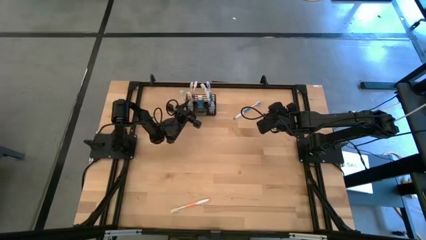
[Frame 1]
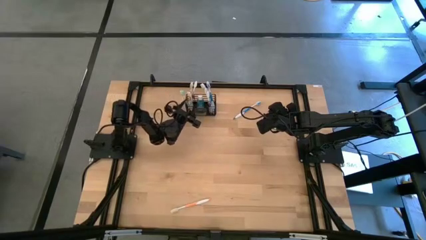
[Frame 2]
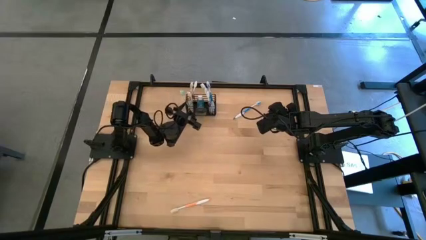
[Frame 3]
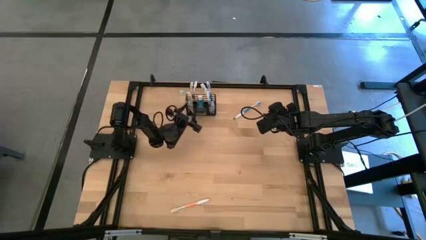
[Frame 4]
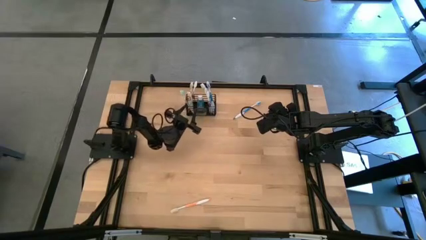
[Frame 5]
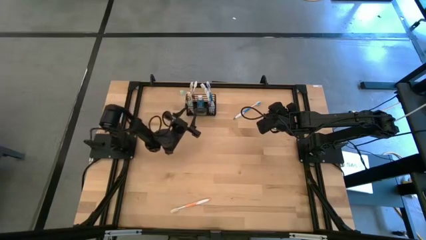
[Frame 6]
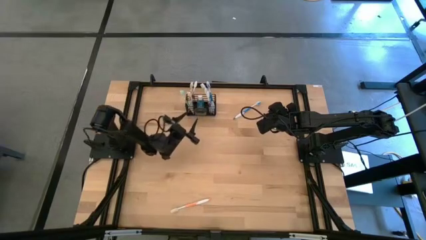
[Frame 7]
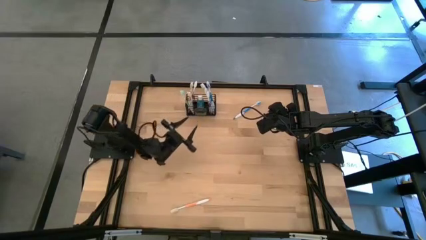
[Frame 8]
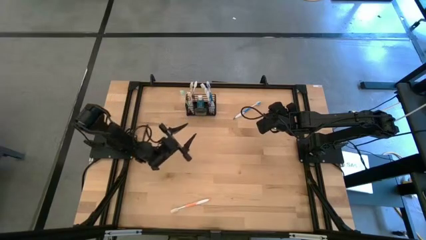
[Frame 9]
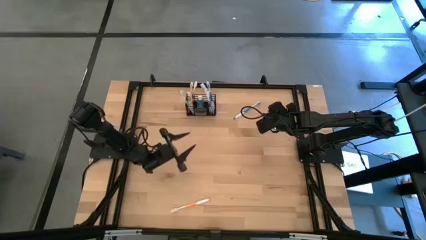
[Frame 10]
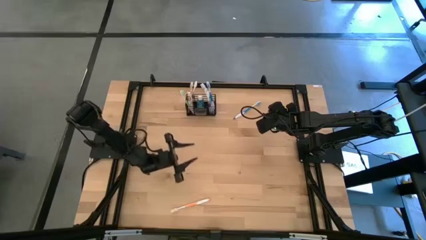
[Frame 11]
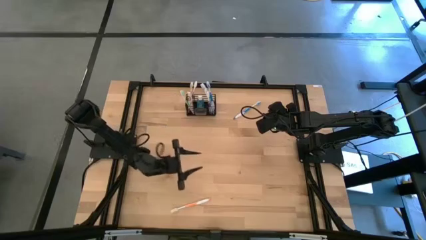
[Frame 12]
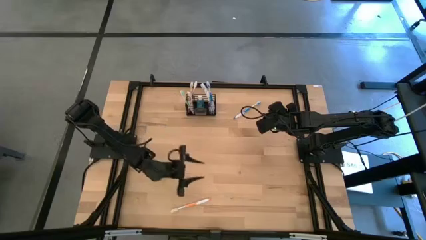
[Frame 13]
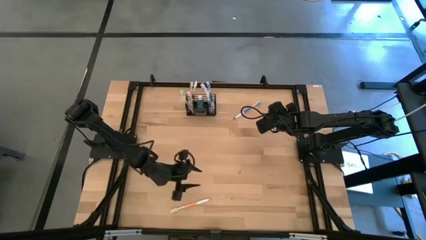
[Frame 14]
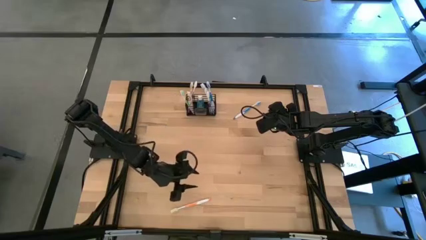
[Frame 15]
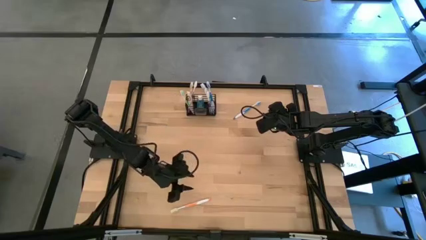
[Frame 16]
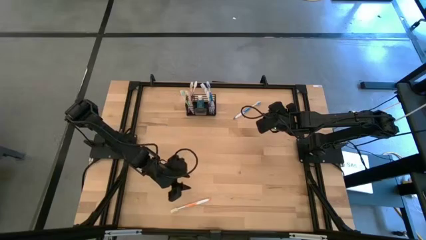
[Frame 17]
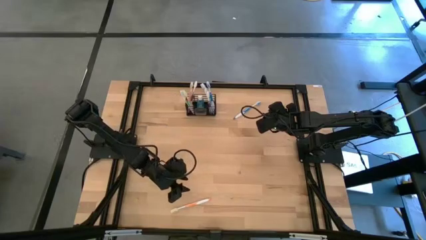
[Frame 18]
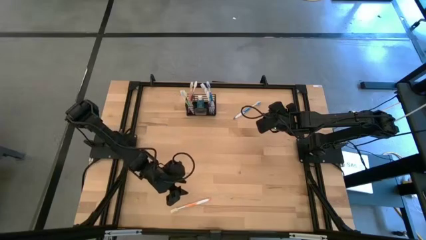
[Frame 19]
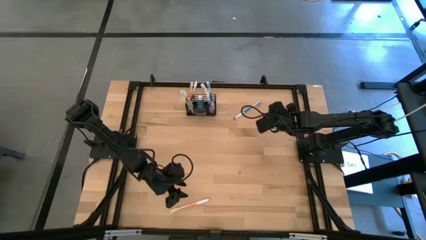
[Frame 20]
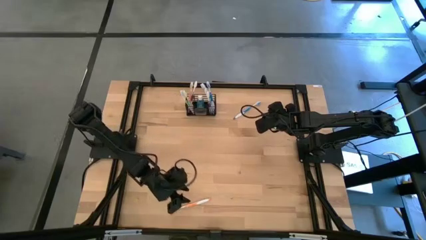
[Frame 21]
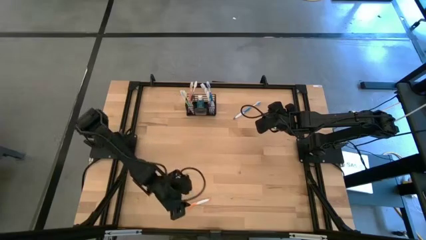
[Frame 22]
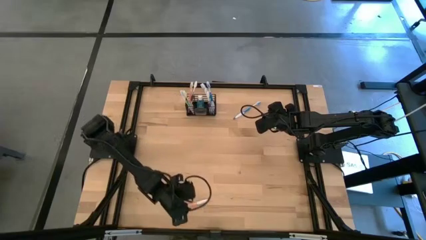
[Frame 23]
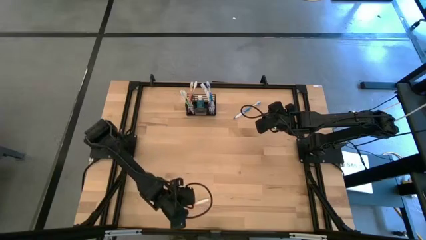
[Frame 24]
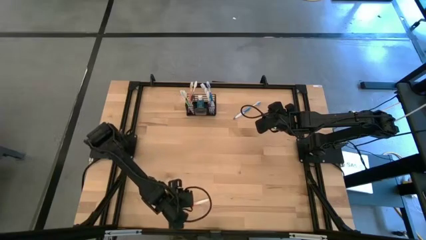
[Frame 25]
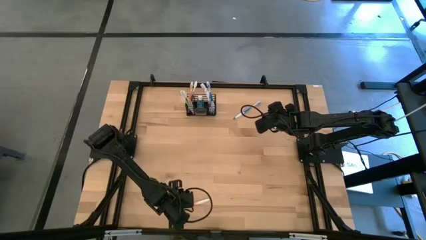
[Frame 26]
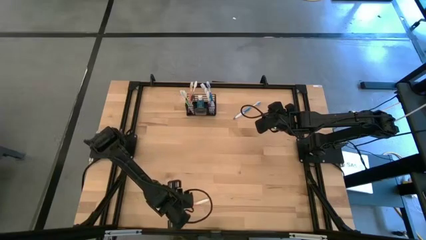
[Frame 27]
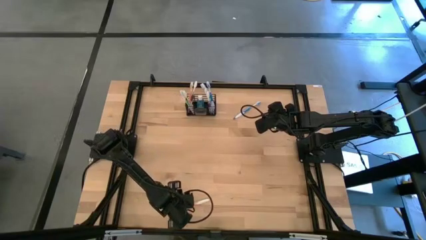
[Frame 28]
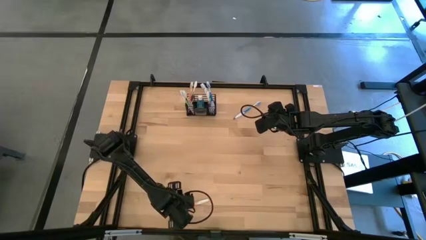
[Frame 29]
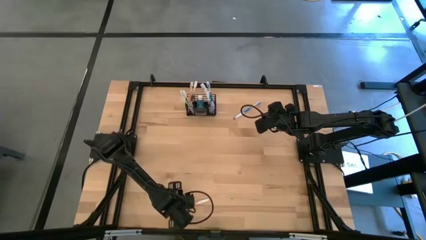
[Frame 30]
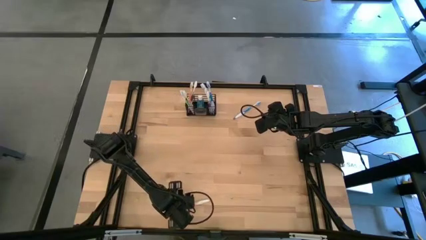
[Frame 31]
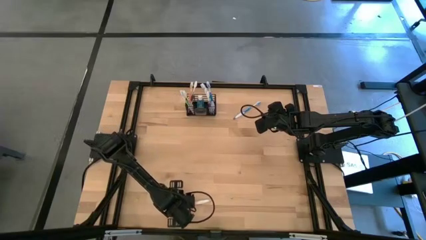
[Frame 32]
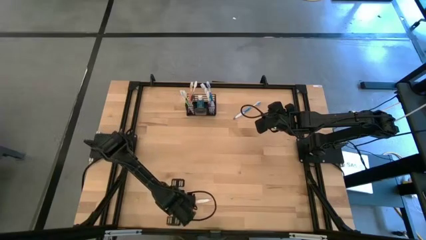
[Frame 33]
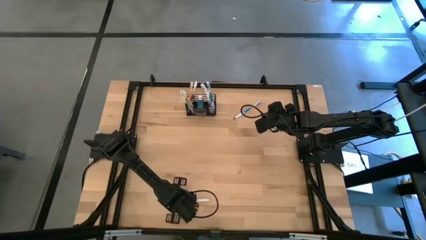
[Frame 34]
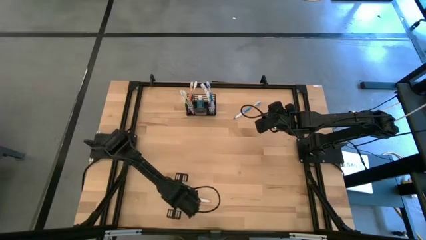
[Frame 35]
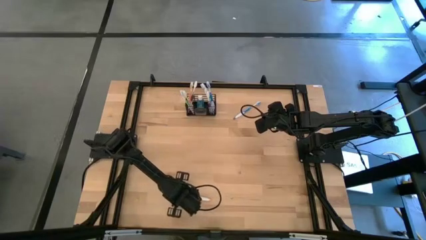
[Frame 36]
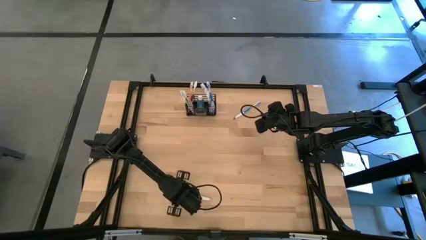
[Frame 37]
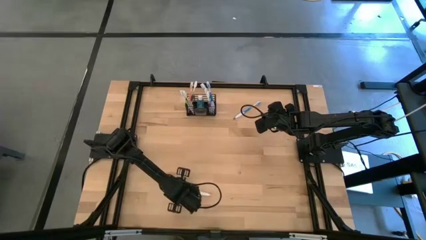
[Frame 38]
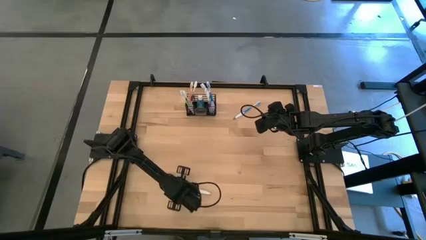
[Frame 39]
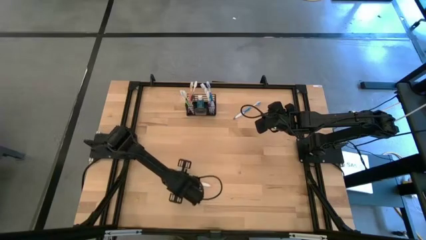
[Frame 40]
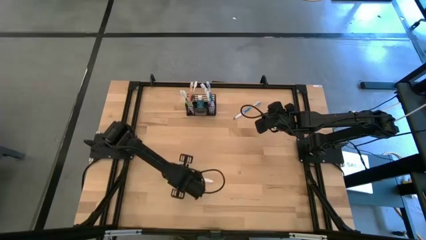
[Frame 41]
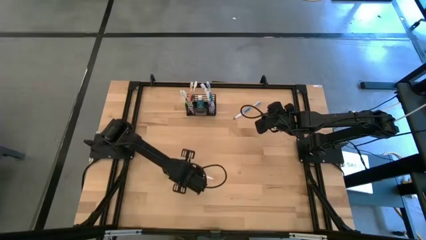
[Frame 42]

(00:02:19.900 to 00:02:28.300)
Task: Pick & Place toothbrushing station
Put the orange toothbrush into the black wire organizer
